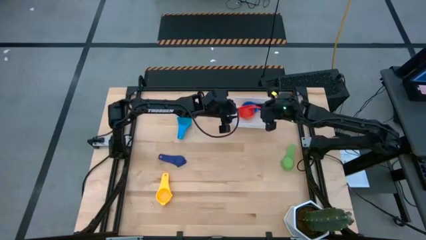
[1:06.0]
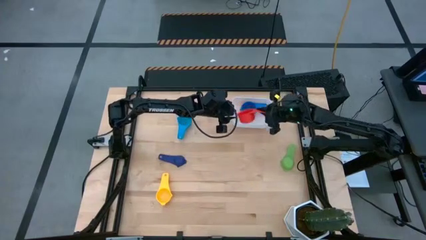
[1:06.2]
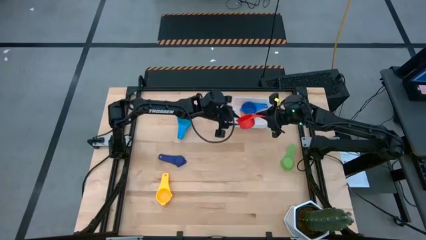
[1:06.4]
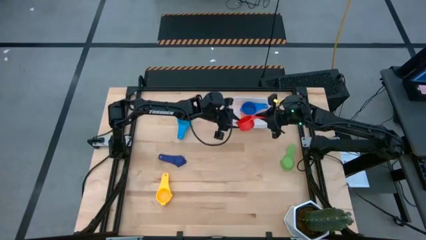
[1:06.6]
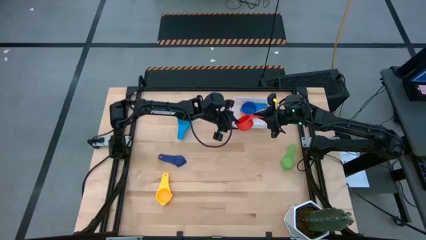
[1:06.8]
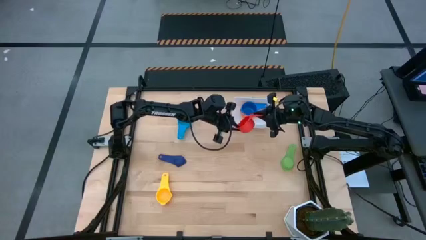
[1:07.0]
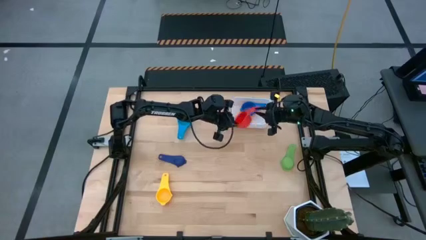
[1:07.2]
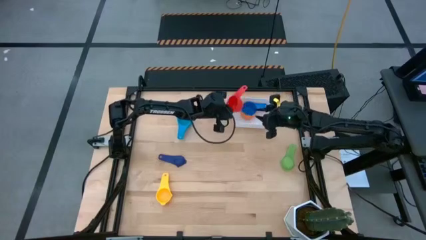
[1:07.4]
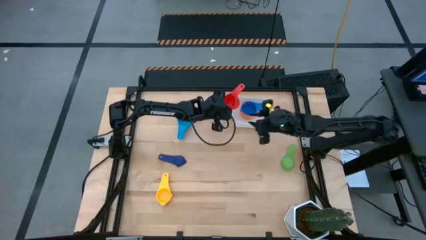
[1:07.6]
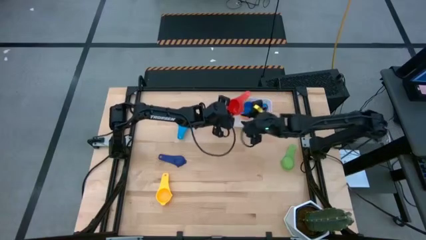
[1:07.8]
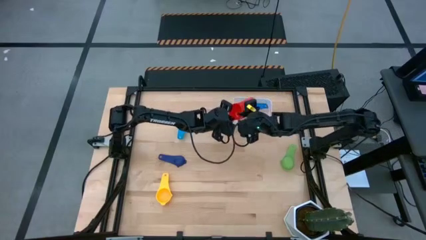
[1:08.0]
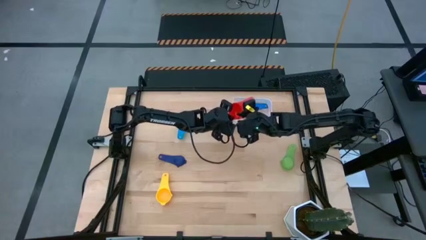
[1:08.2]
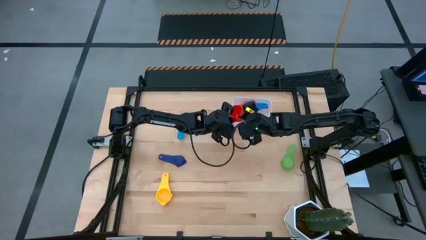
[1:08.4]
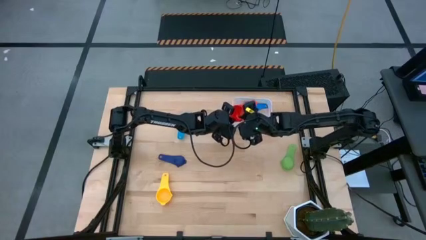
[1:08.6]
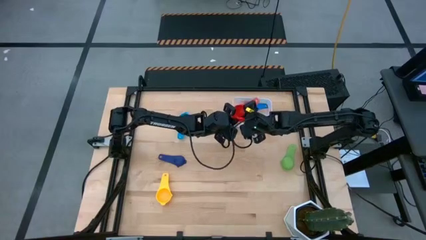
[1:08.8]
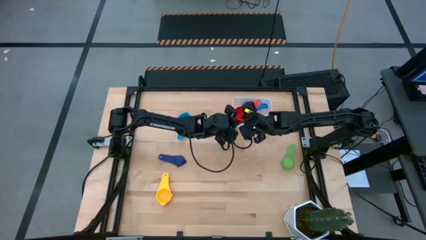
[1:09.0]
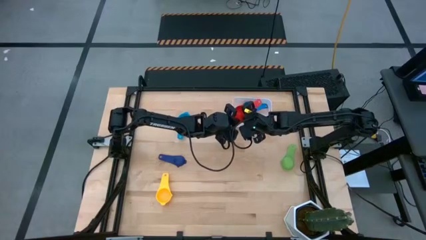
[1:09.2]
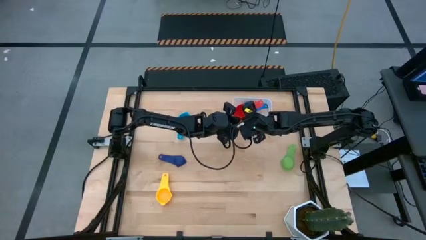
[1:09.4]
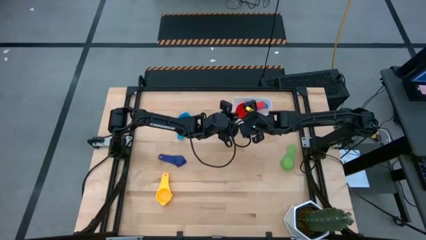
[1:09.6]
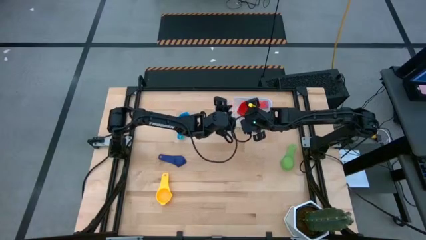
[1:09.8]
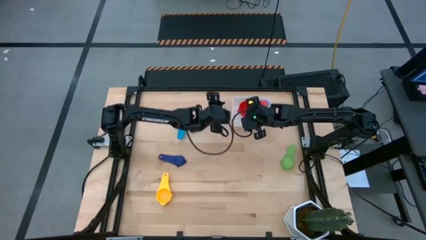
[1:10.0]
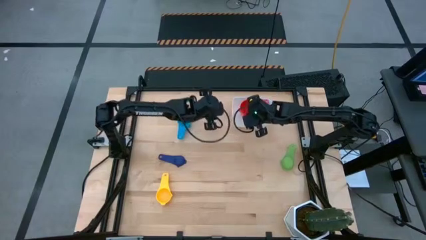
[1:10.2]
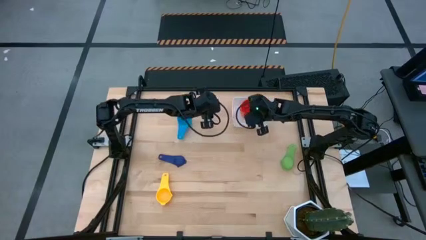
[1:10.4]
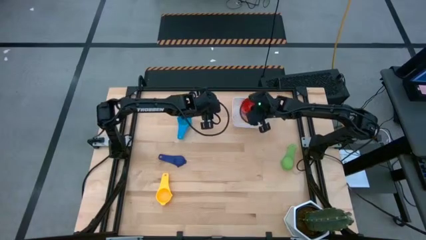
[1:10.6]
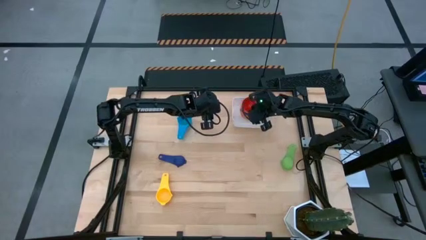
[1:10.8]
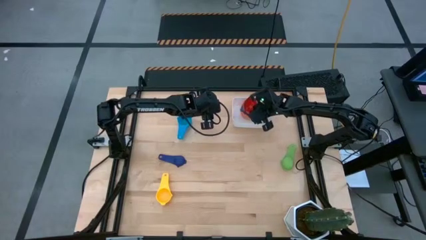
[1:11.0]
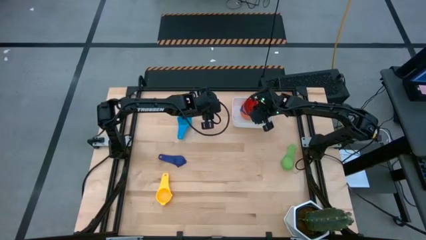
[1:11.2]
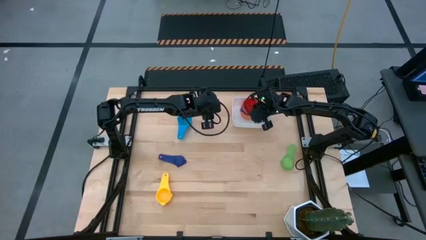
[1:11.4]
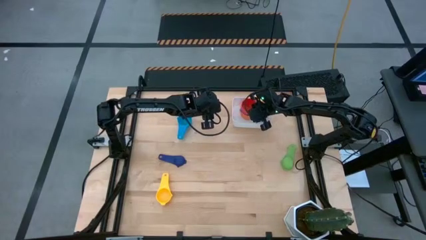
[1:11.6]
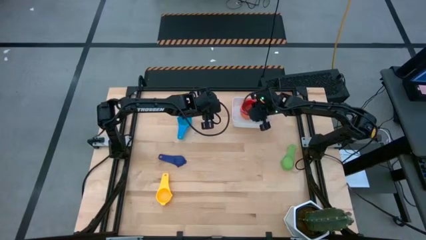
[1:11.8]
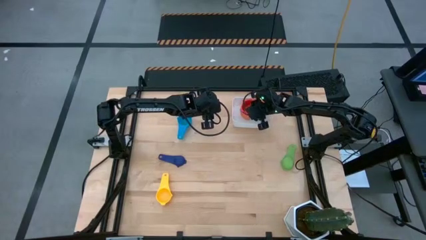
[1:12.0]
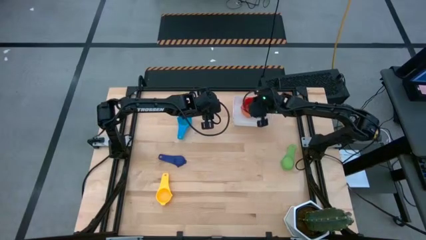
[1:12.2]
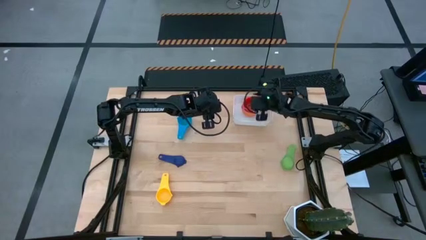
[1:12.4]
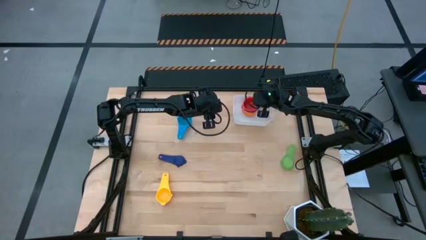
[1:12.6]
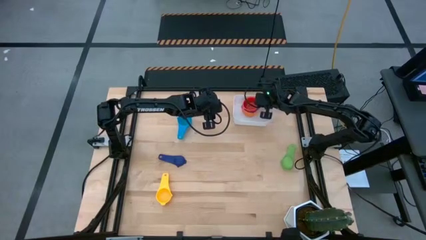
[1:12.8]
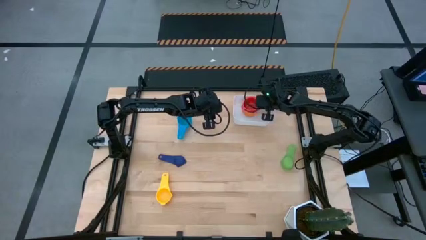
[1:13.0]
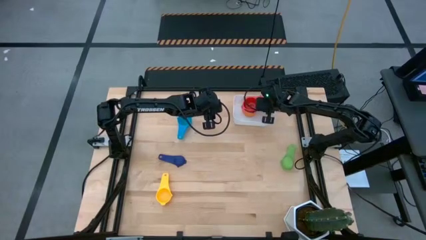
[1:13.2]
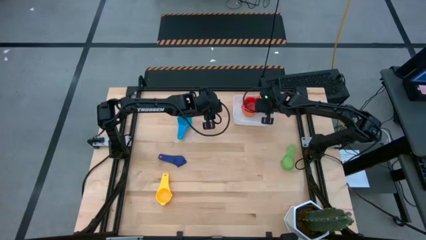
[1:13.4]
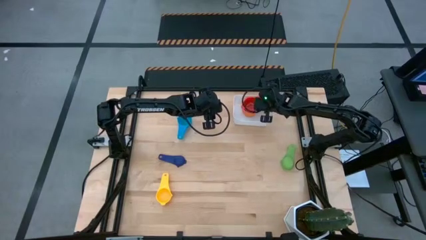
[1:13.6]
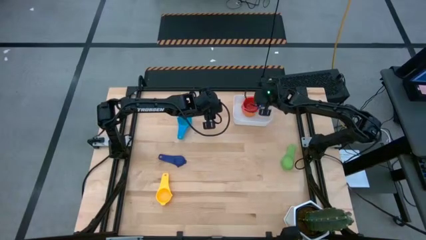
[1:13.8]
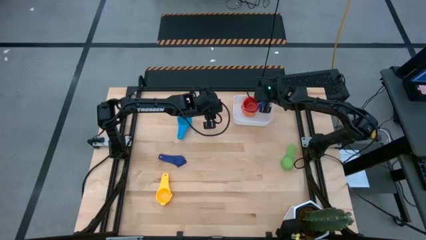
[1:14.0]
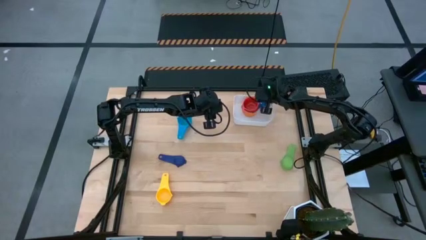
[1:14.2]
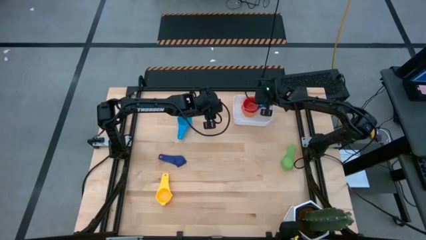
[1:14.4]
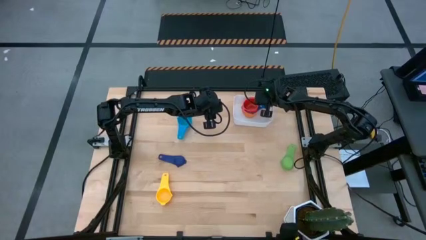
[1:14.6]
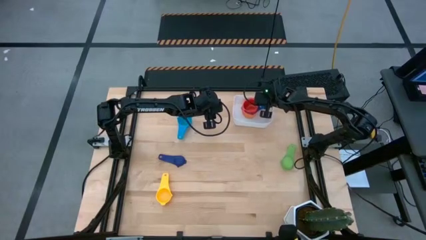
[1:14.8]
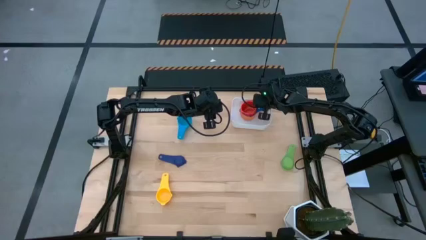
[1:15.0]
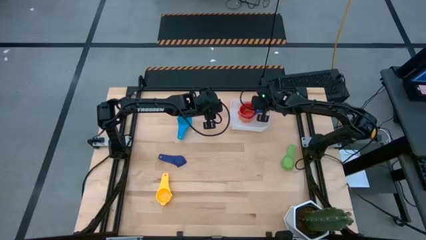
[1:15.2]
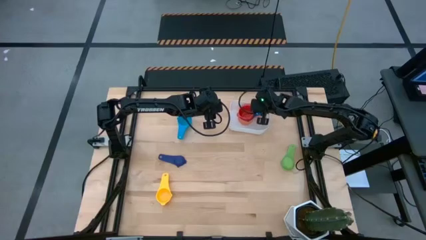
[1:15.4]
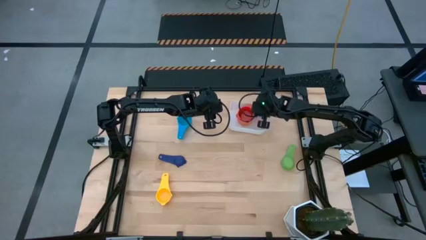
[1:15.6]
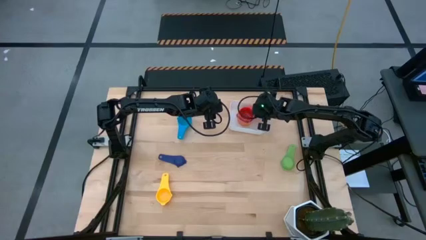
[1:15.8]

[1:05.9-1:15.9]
Task: Nest measuring cups in basket
Stack the red measuring cup on top of the blue measuring cup in the white bin

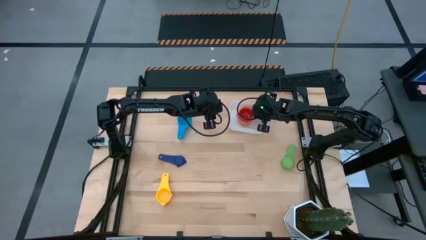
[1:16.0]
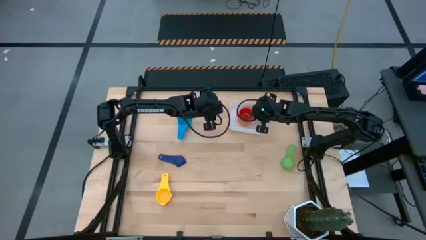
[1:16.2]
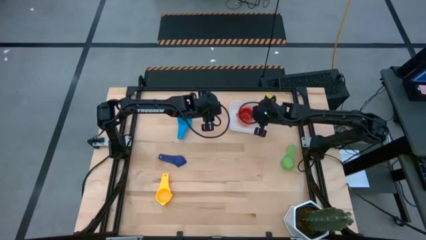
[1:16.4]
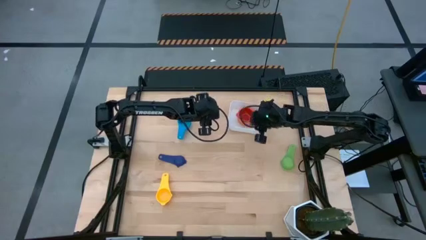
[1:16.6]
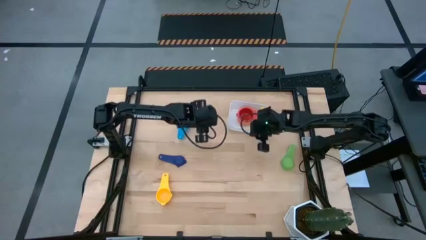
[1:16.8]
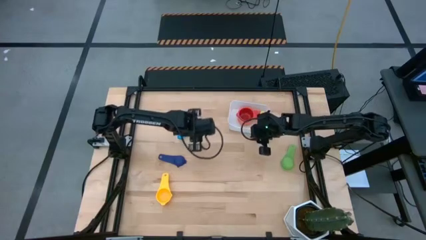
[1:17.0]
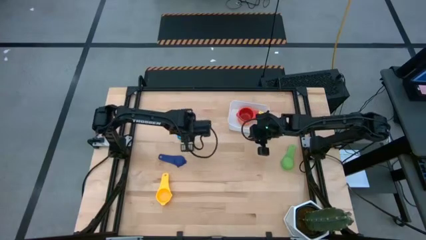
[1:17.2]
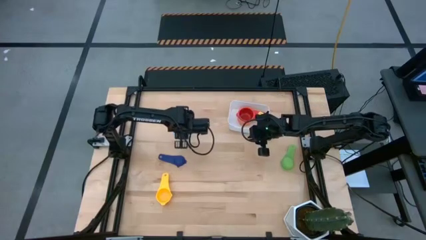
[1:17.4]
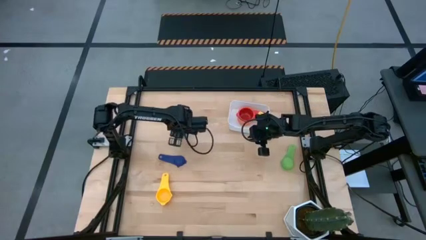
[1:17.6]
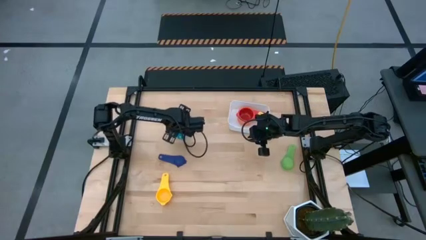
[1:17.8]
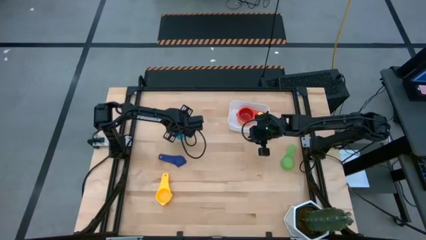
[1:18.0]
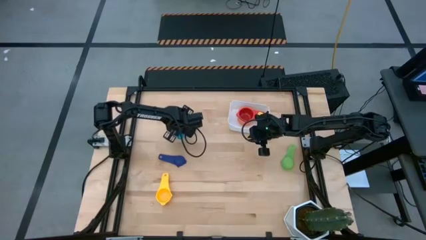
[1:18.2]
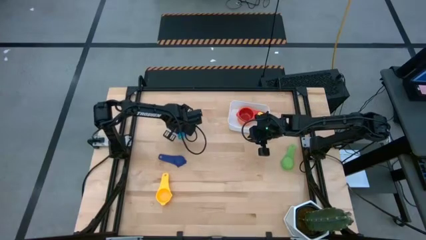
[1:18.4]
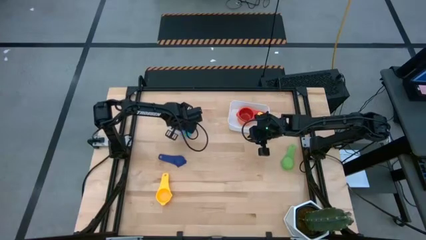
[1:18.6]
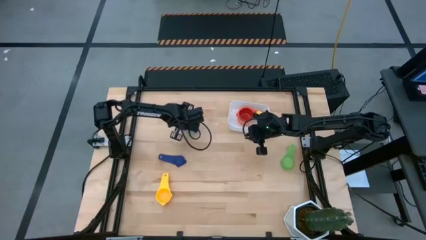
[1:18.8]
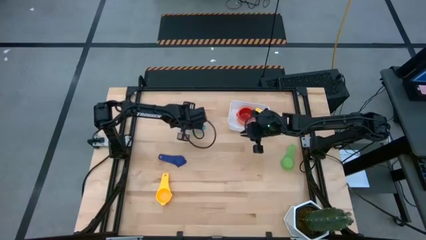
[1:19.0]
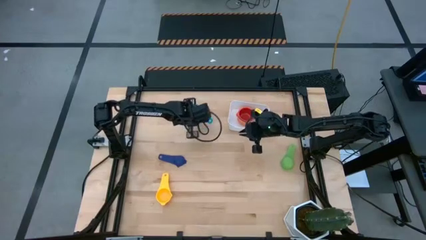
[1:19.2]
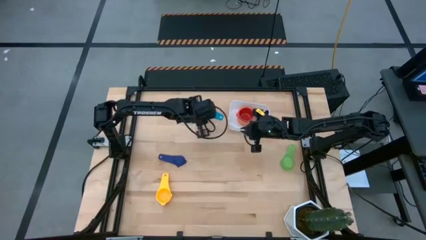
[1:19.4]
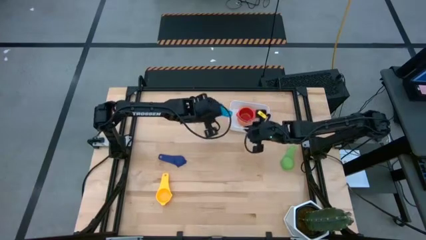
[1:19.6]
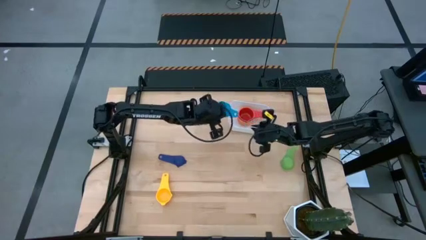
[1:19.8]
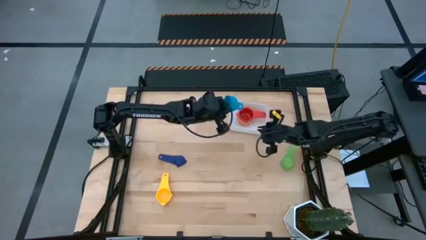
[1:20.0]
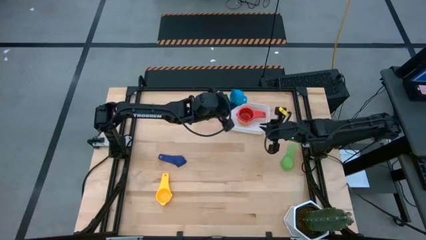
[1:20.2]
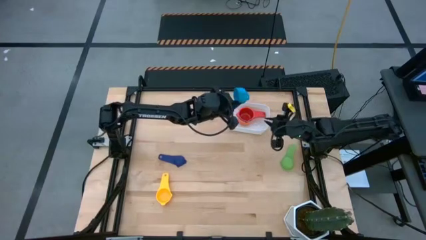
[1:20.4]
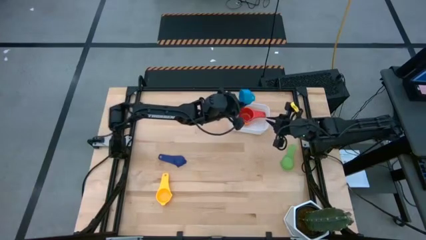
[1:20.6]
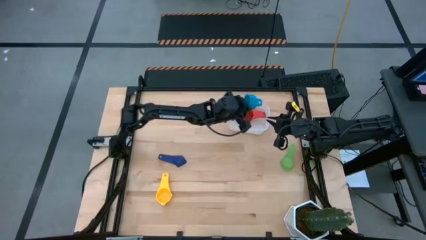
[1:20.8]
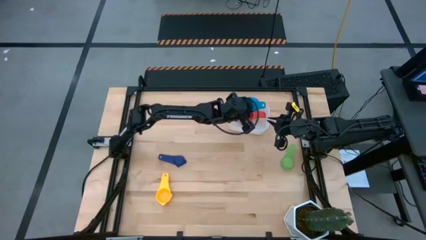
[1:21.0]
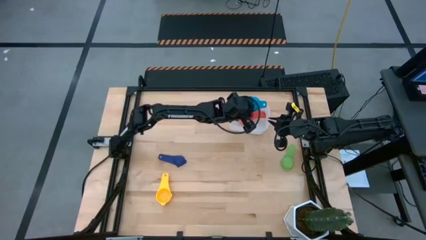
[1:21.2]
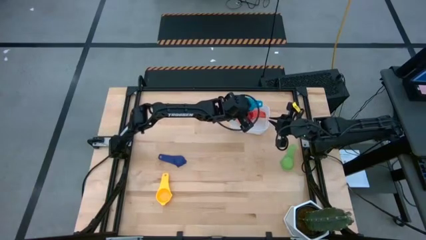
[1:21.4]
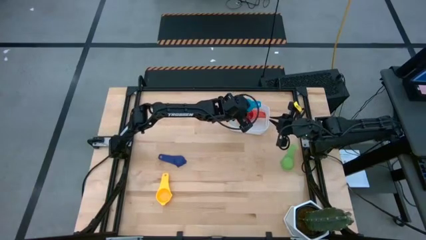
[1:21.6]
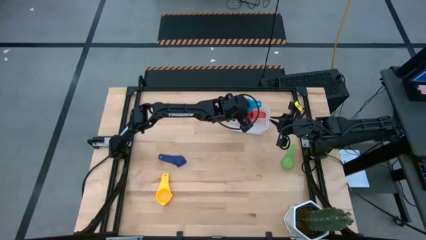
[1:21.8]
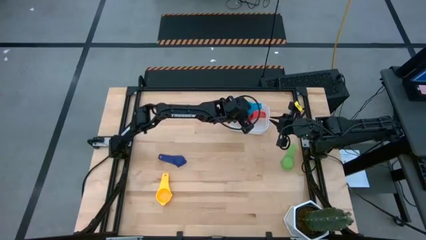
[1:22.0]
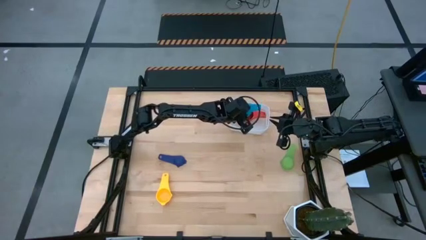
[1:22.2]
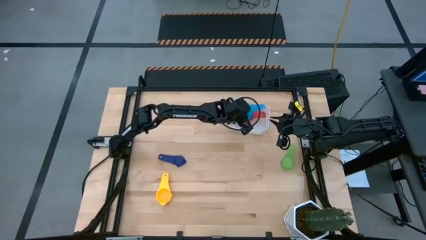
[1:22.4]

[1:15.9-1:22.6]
Stack the light blue measuring cup on top of the red measuring cup in the white bin
